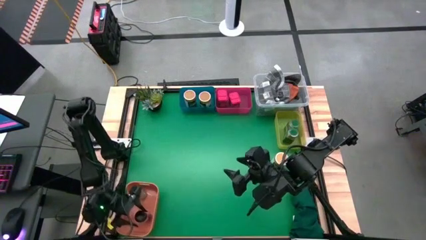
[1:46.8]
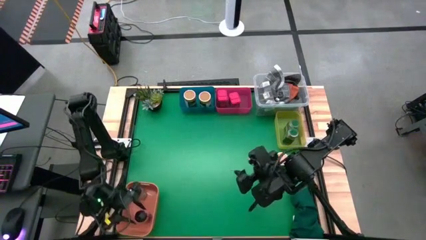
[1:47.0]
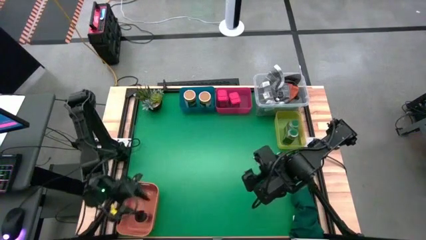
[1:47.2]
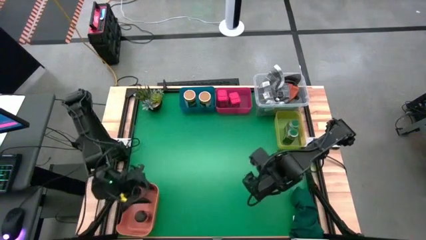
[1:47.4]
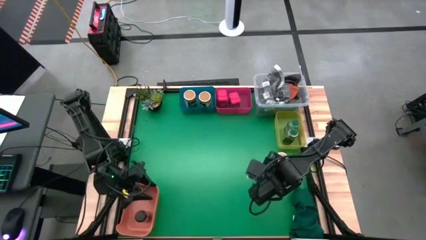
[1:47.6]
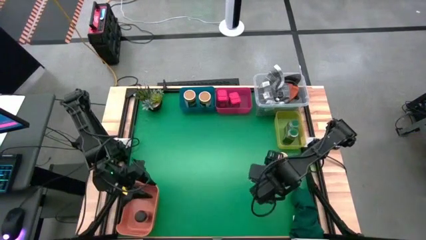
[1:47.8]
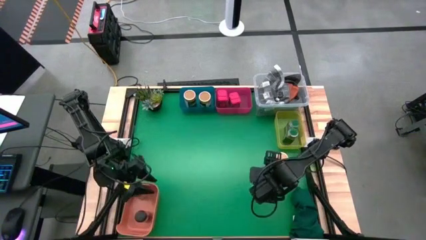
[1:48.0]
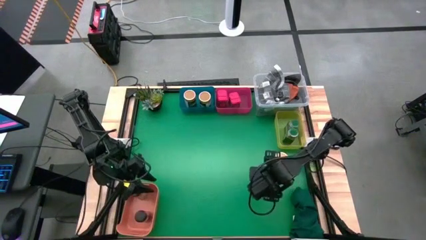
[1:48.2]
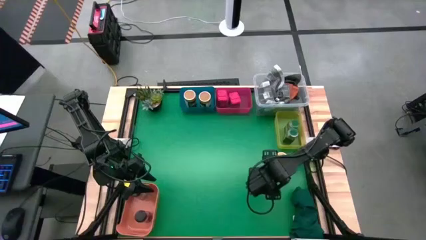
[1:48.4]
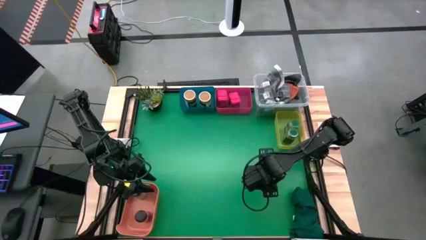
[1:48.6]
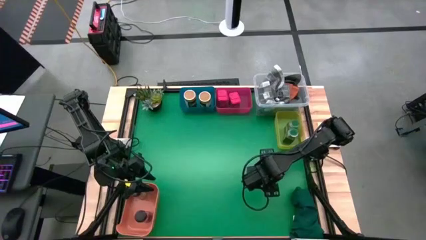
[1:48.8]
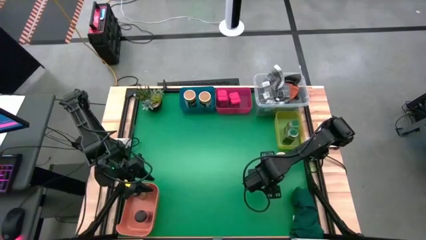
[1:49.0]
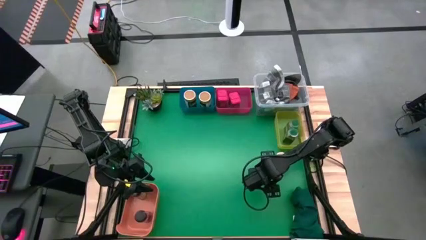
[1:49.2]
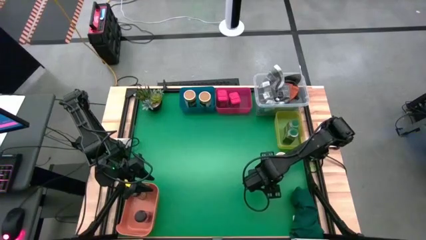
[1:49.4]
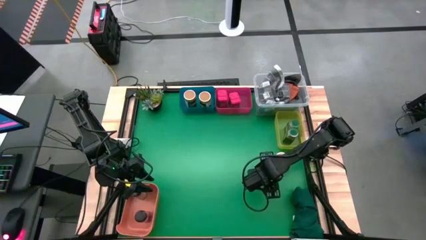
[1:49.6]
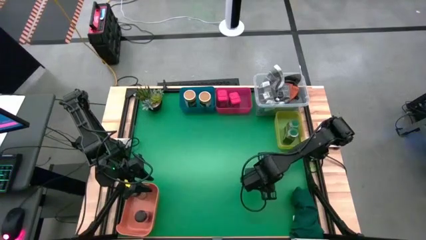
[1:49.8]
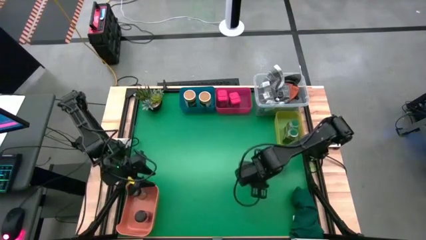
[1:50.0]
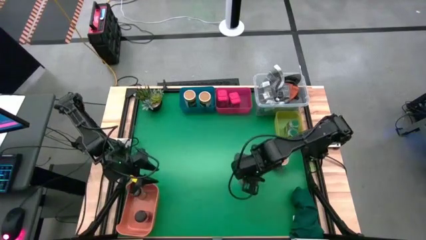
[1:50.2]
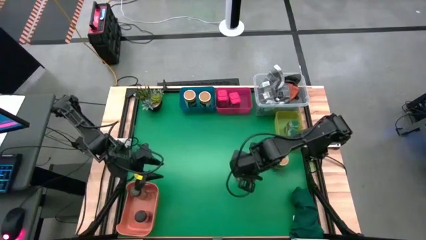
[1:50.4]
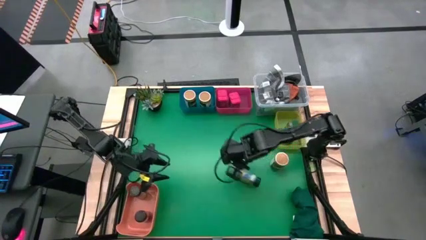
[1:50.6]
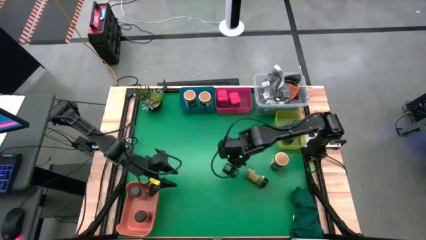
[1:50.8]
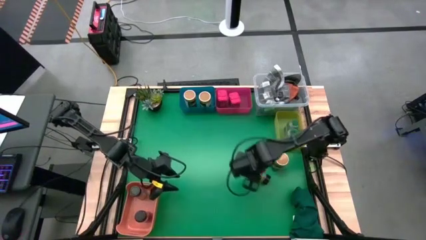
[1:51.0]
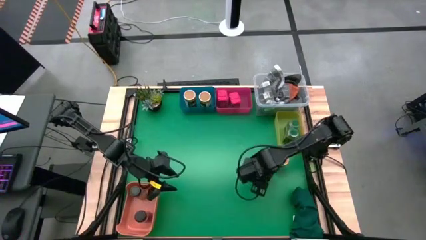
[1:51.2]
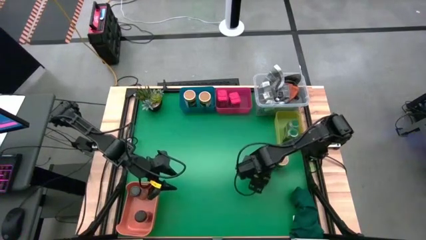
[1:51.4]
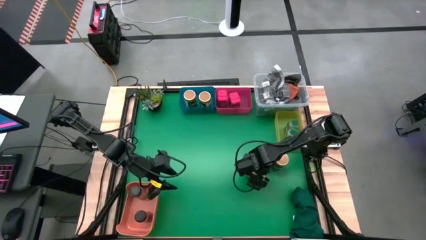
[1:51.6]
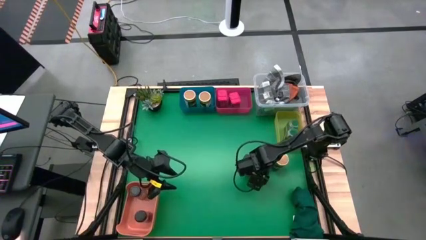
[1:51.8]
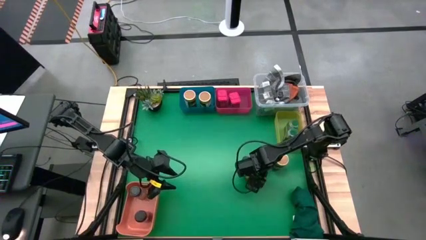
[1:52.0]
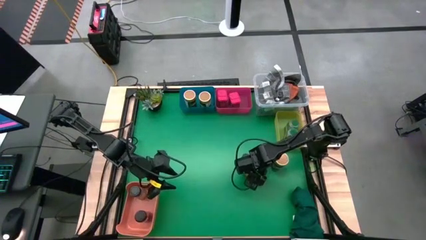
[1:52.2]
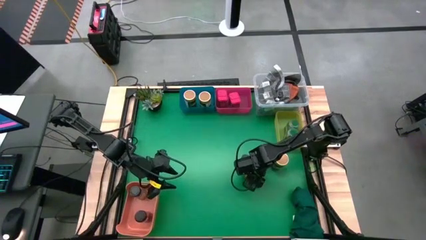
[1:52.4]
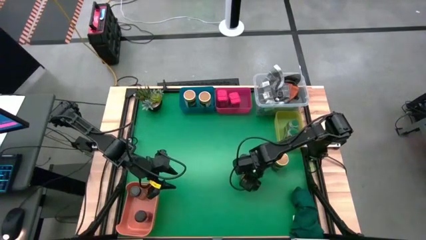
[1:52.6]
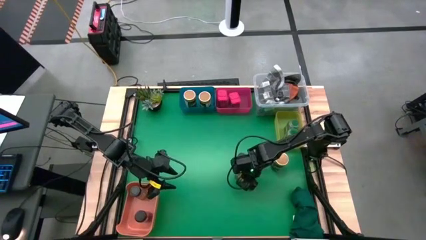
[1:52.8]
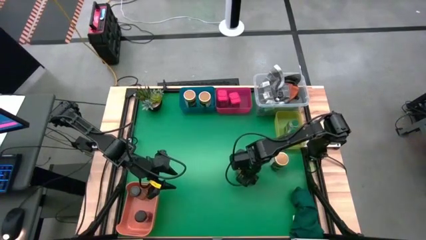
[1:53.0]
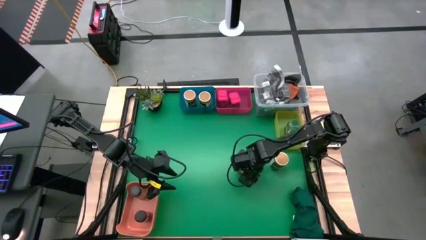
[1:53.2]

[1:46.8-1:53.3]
Task: Sort spices by type
Put the black spice bottle into the orange bin

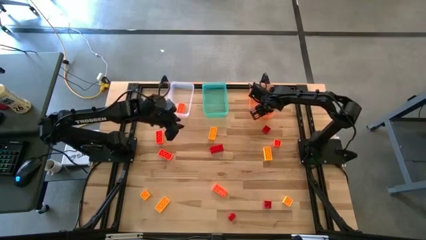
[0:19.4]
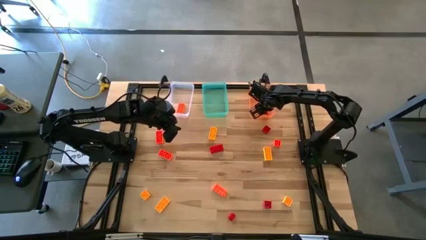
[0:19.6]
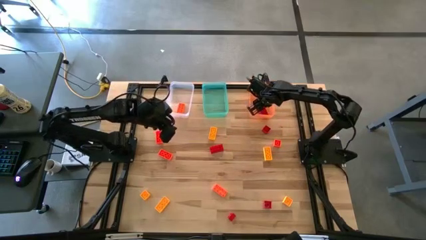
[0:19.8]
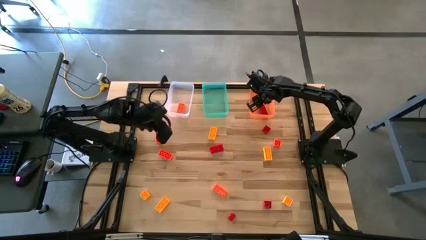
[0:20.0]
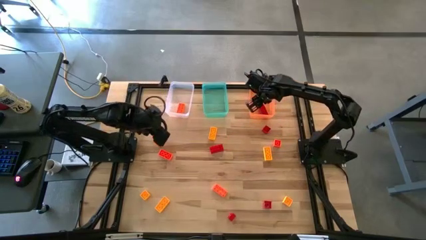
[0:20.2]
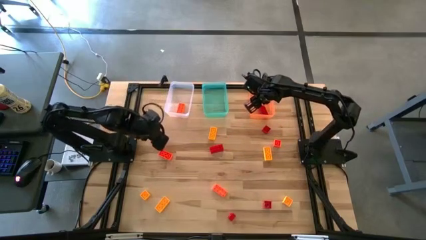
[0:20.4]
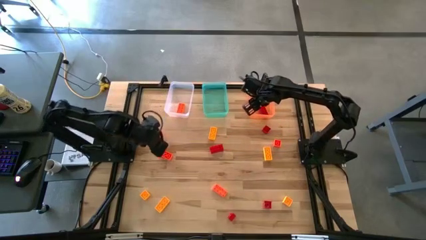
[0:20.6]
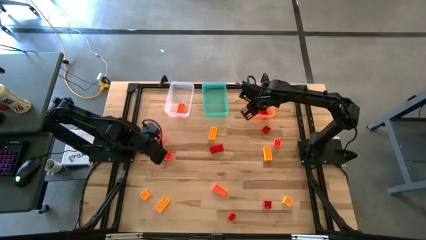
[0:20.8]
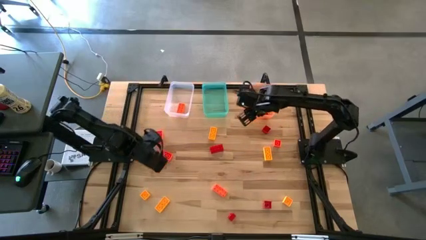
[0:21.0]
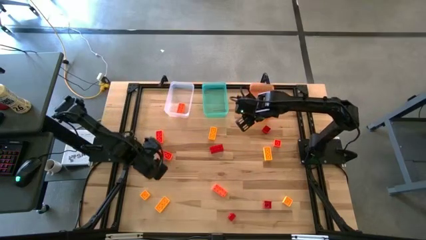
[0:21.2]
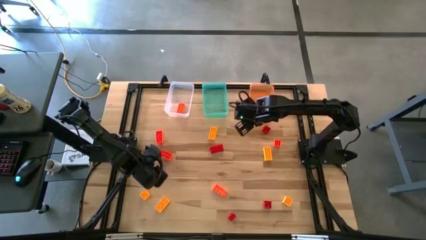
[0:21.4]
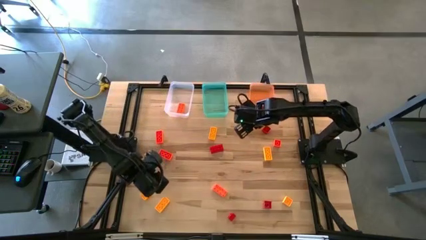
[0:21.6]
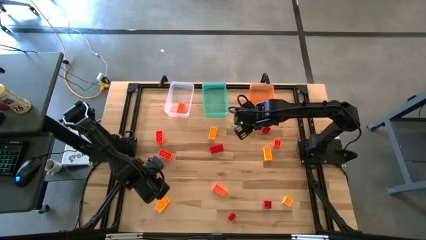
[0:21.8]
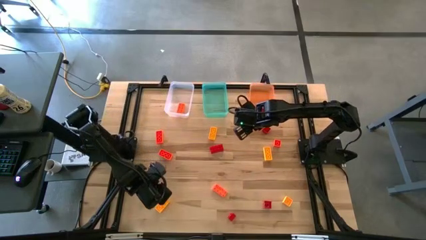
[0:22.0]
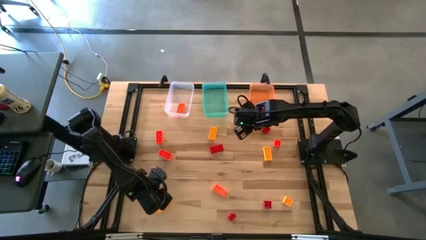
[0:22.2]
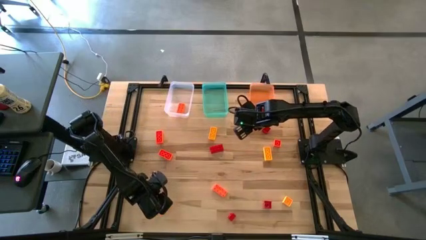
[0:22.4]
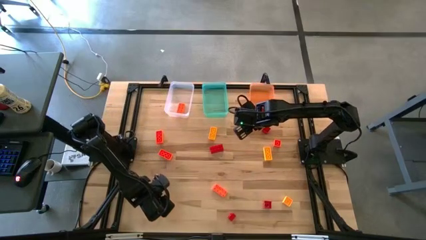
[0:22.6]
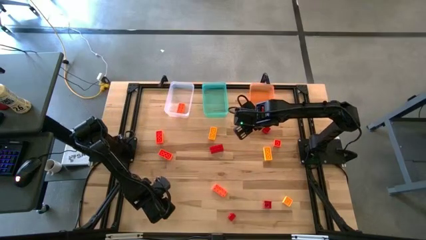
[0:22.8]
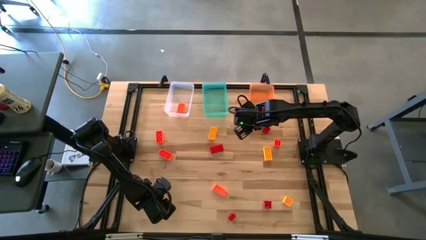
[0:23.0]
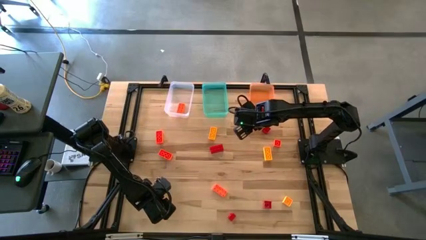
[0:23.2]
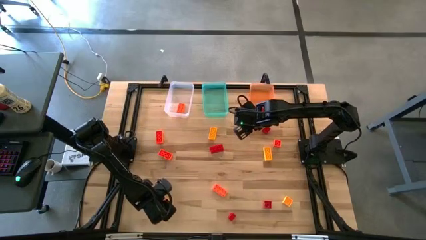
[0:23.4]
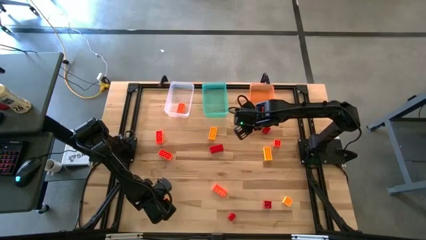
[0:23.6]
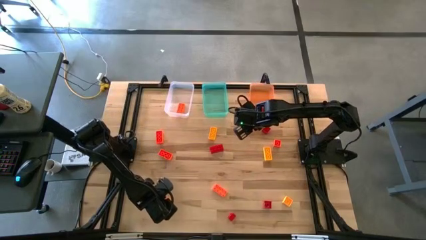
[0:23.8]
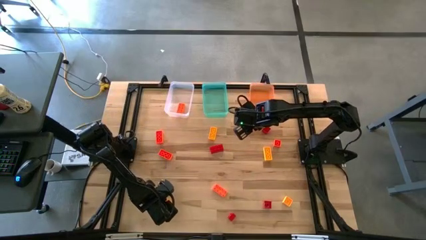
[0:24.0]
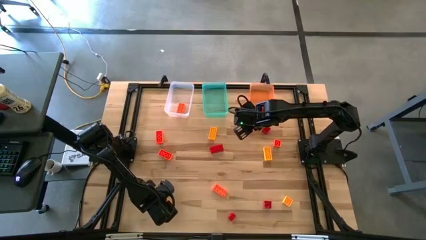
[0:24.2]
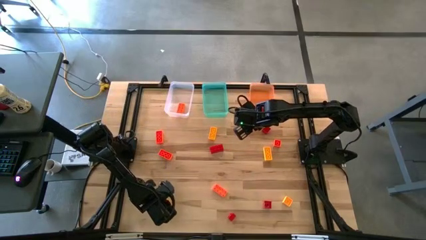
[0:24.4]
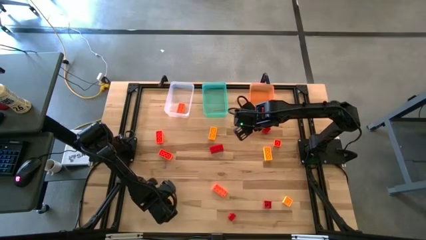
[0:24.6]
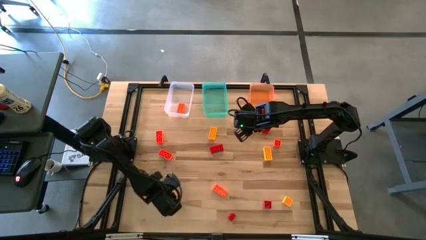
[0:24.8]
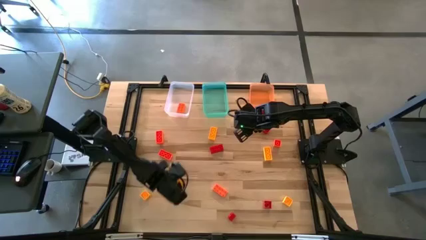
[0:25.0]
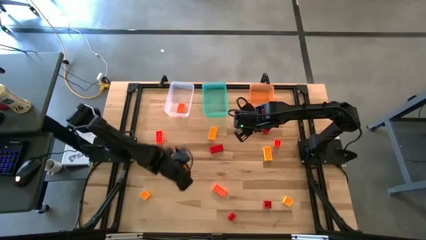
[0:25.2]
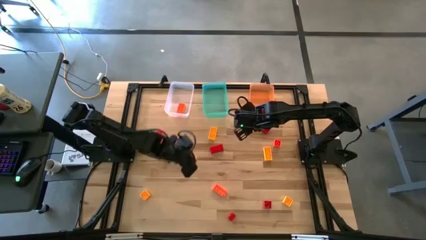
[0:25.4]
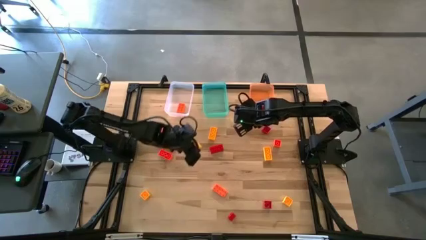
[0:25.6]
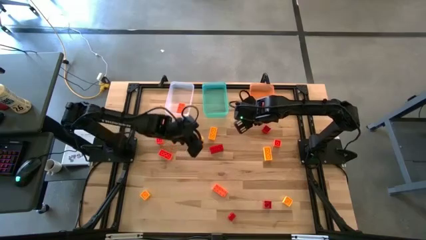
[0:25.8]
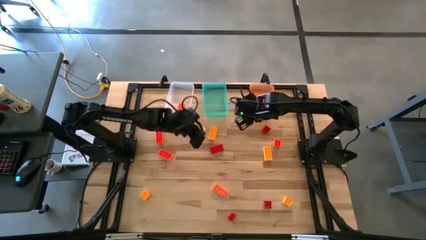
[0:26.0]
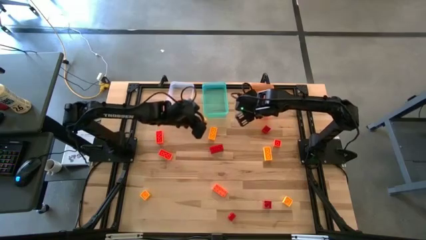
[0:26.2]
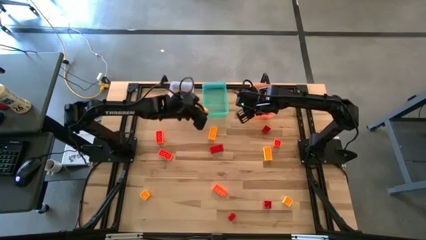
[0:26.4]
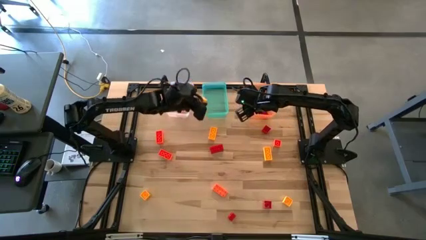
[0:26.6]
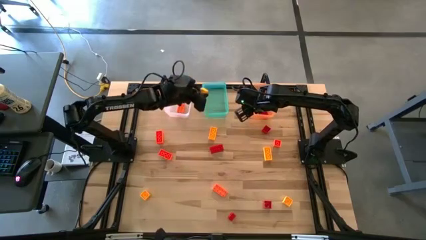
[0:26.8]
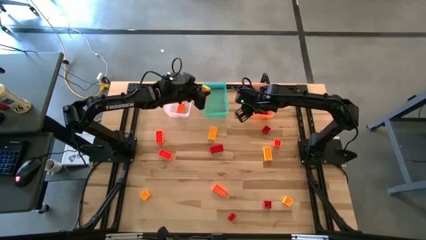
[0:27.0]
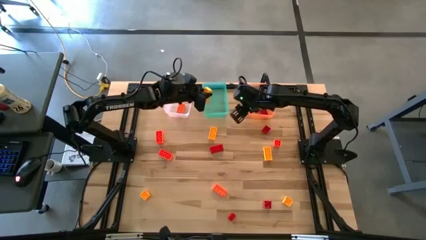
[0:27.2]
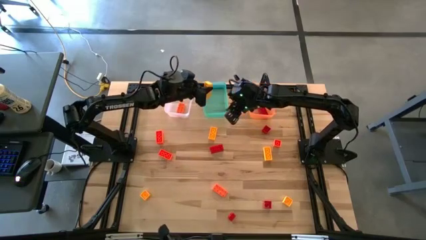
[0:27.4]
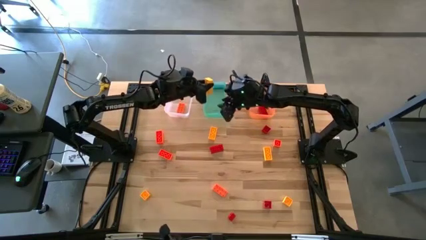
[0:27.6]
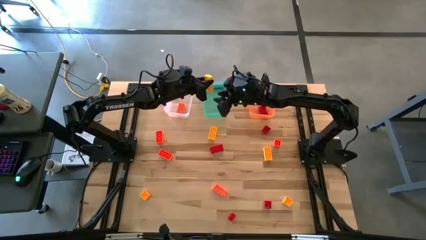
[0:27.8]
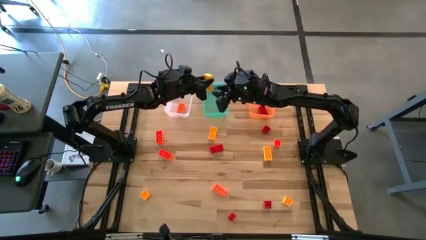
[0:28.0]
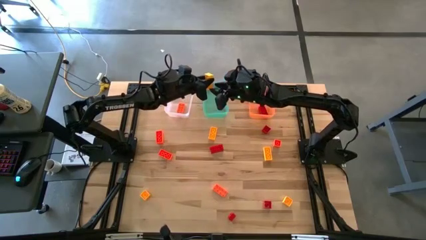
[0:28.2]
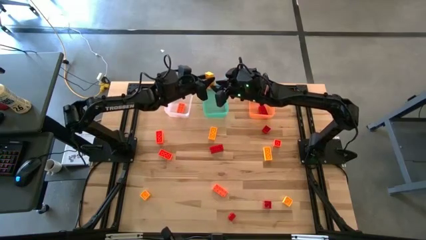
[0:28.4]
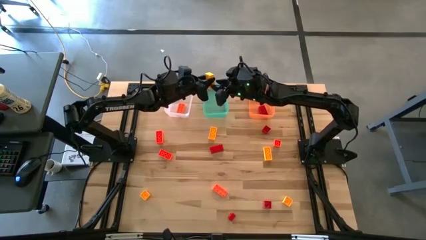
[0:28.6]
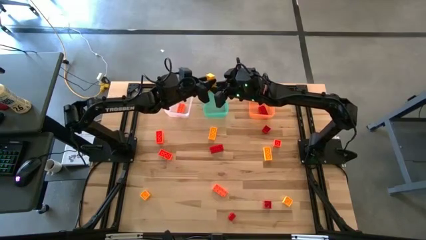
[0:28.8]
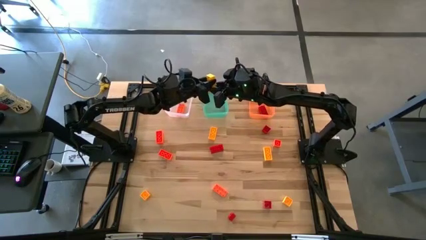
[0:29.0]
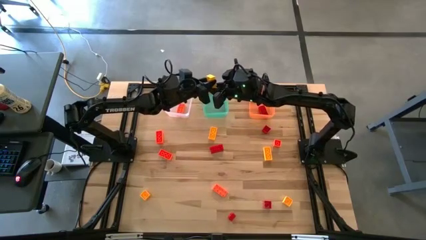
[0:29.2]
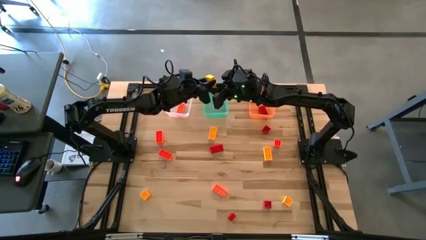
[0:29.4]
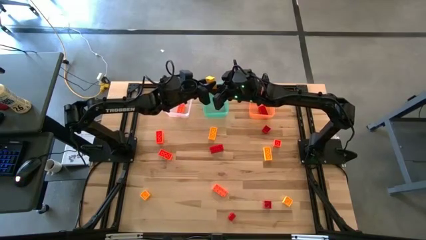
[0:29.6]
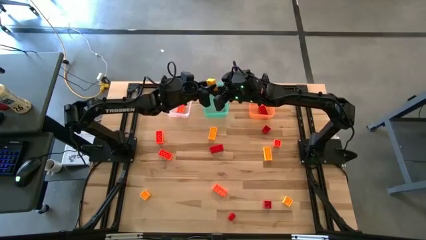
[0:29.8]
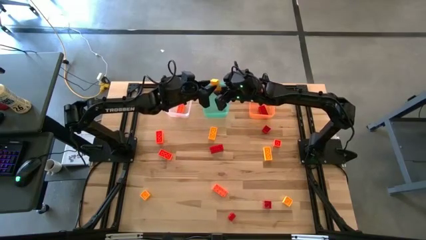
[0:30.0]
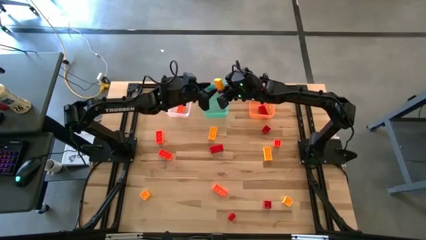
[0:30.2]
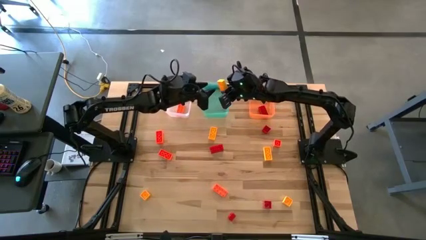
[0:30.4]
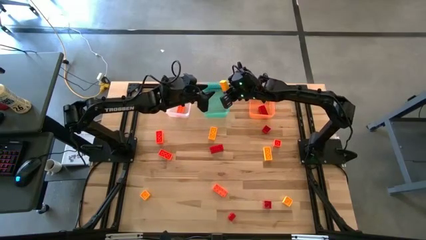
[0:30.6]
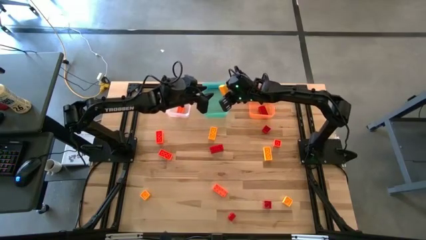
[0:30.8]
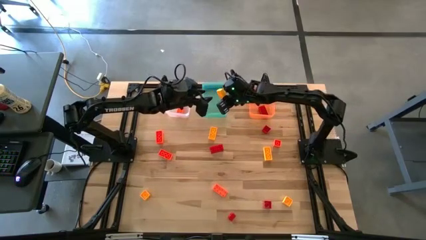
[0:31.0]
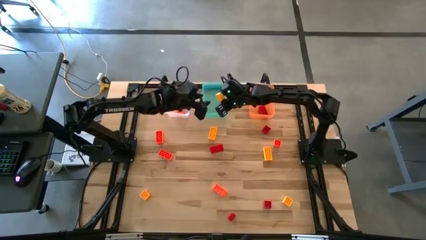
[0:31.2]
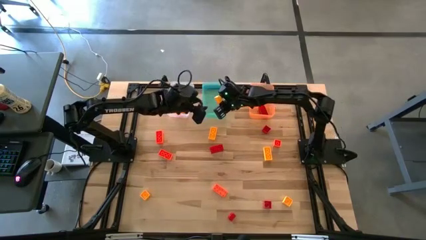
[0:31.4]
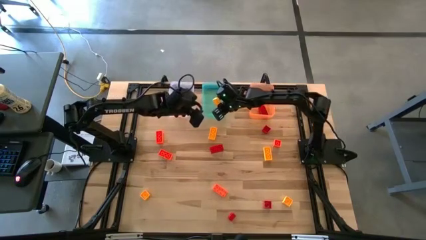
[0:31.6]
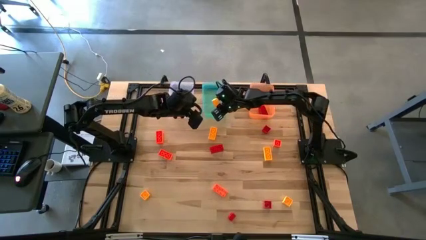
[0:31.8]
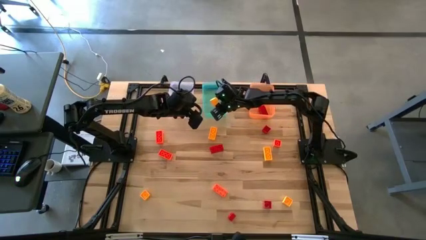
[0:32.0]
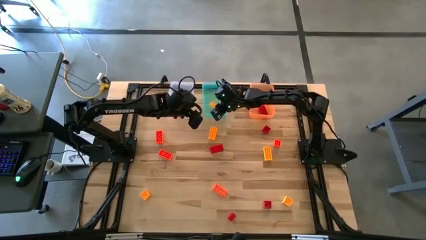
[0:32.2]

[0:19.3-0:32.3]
Task: Sort & place blocks by color
Put the yellow game piece into the green bin
